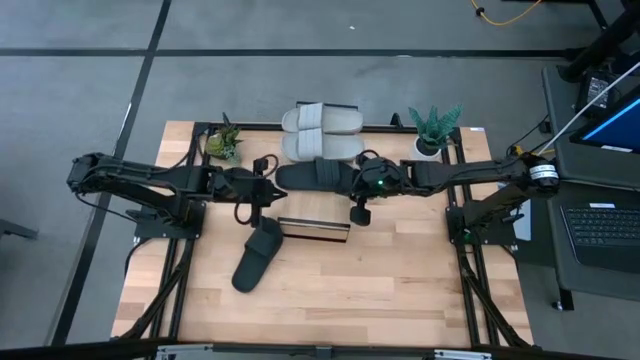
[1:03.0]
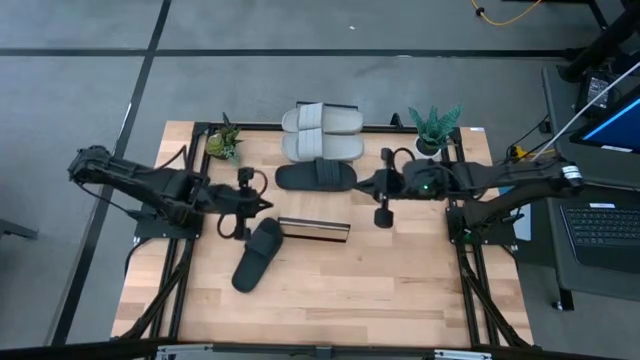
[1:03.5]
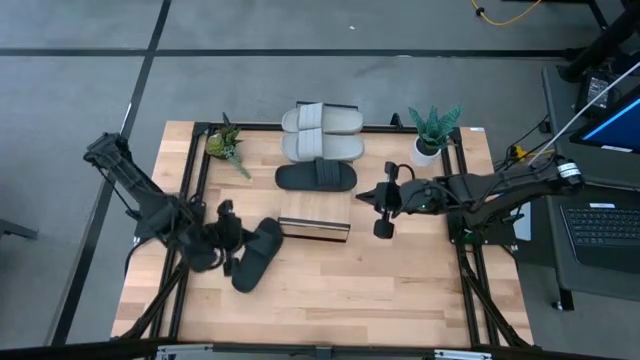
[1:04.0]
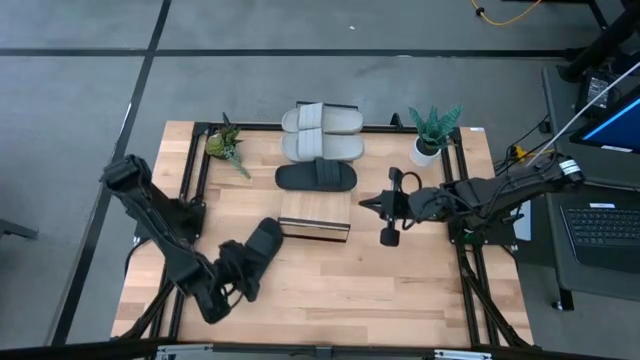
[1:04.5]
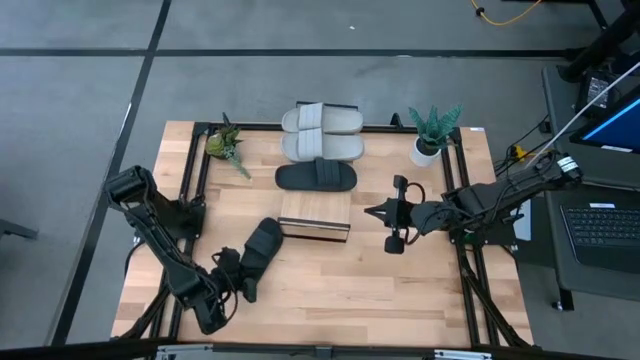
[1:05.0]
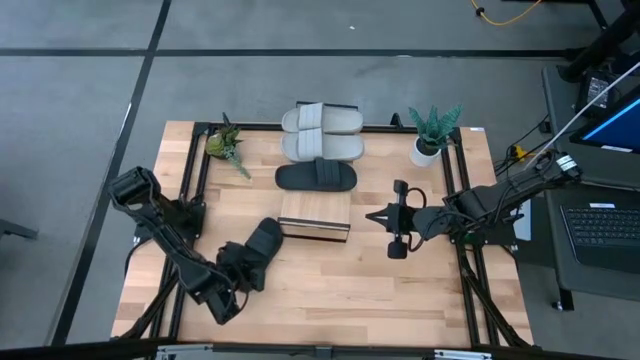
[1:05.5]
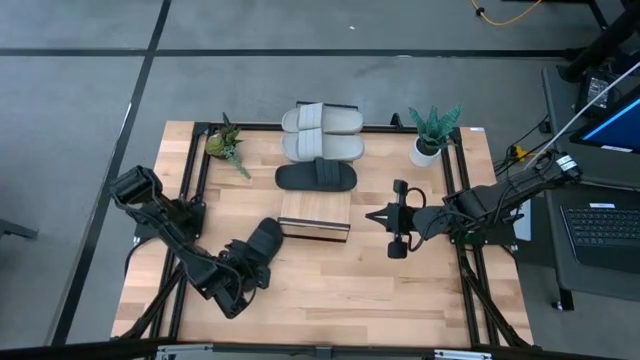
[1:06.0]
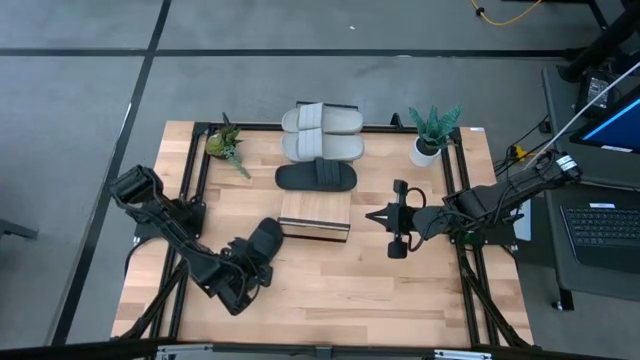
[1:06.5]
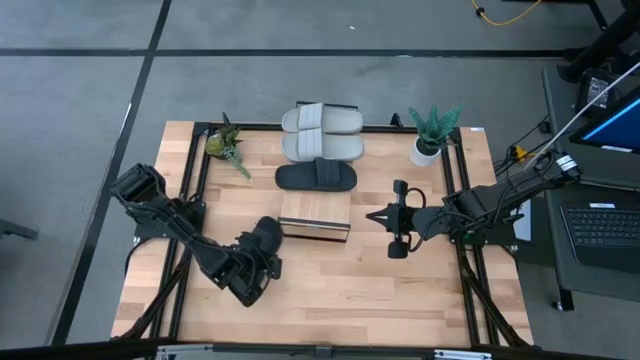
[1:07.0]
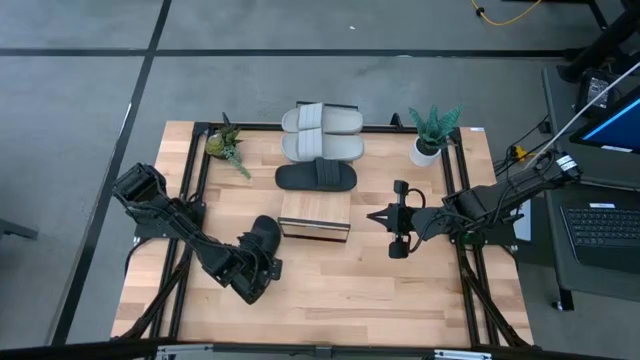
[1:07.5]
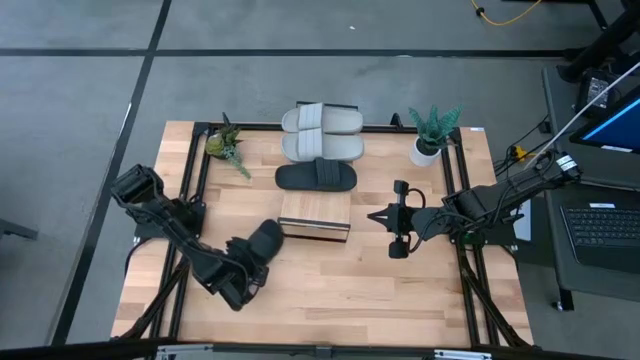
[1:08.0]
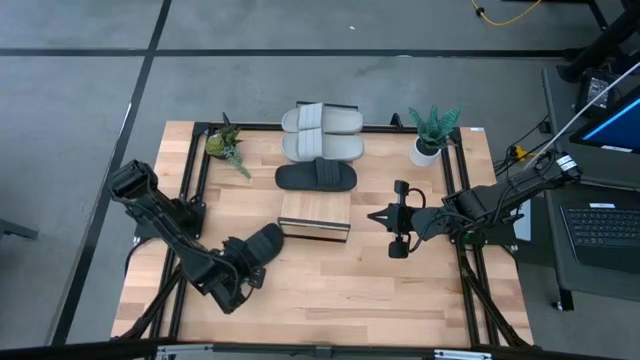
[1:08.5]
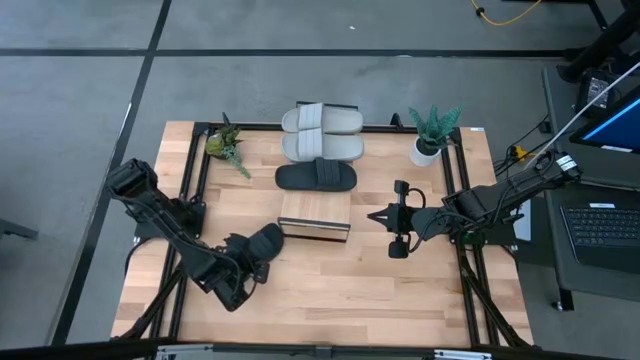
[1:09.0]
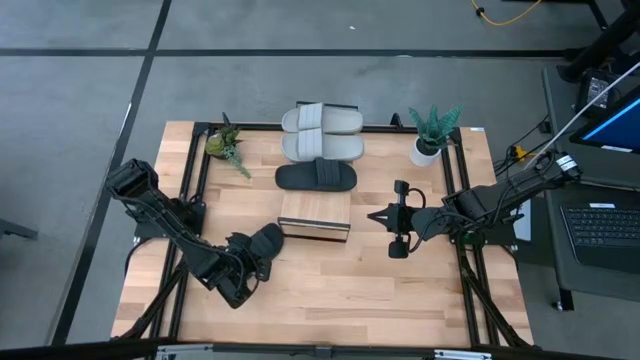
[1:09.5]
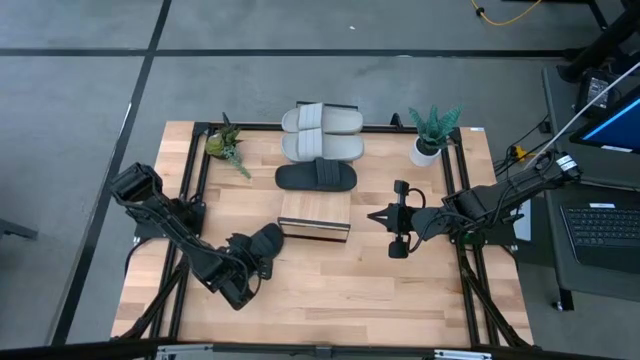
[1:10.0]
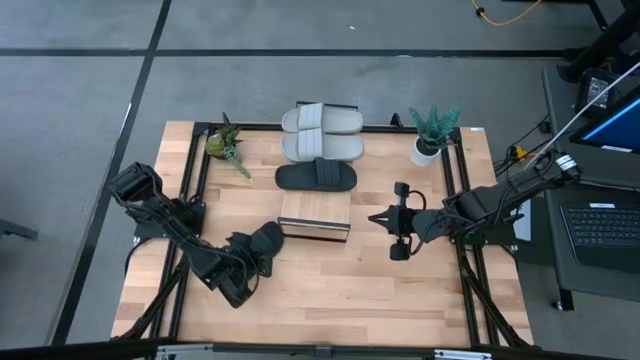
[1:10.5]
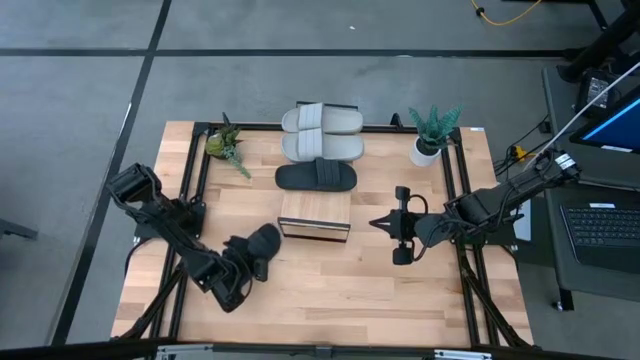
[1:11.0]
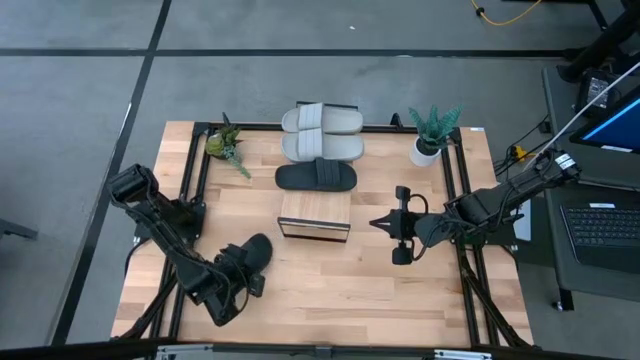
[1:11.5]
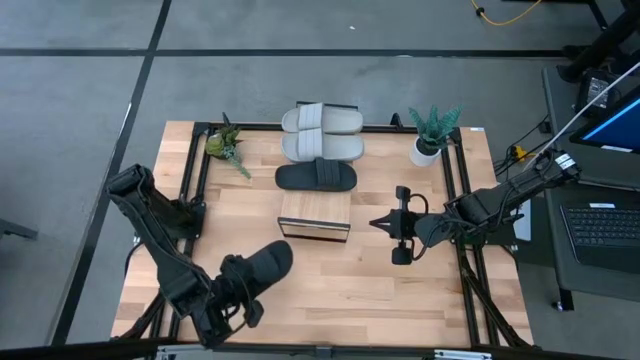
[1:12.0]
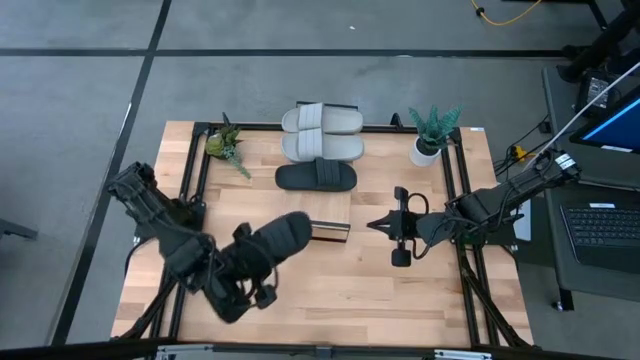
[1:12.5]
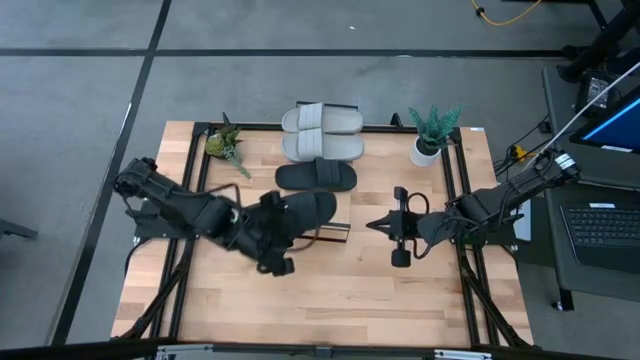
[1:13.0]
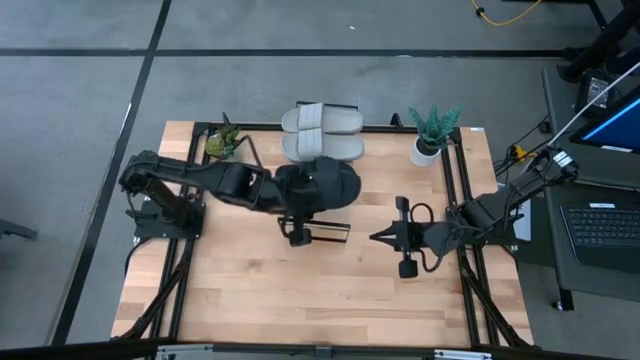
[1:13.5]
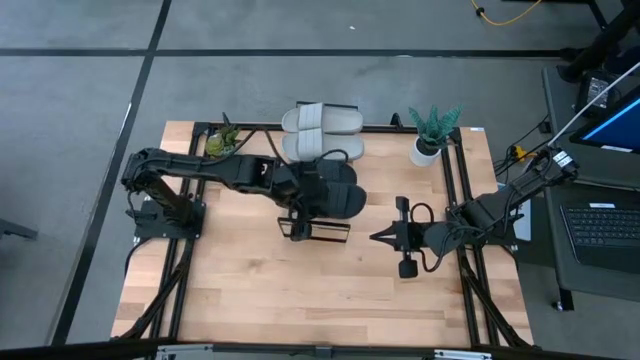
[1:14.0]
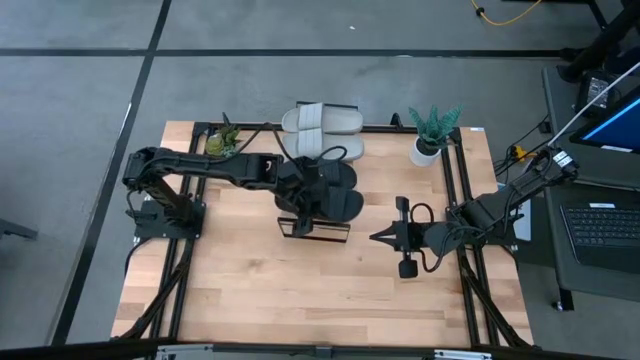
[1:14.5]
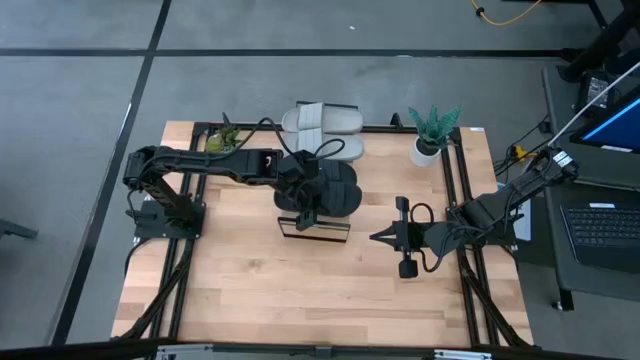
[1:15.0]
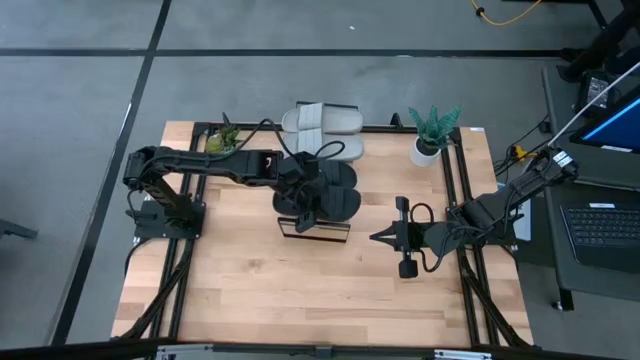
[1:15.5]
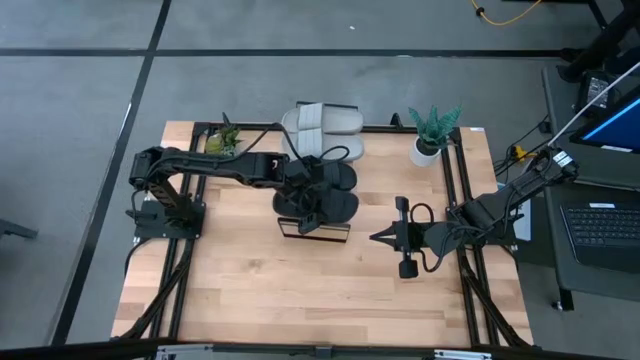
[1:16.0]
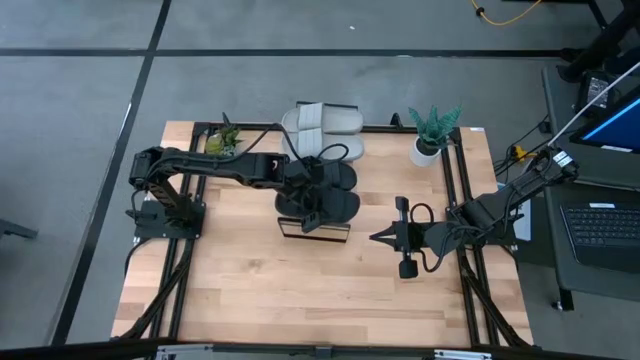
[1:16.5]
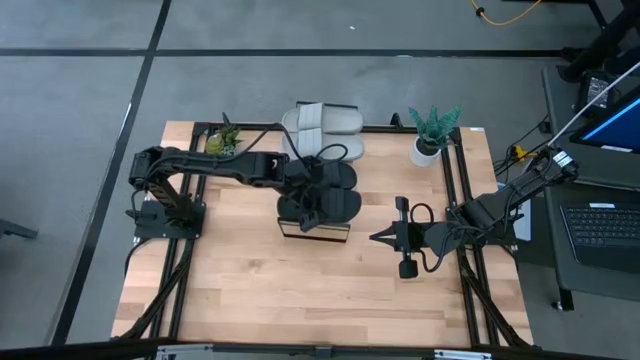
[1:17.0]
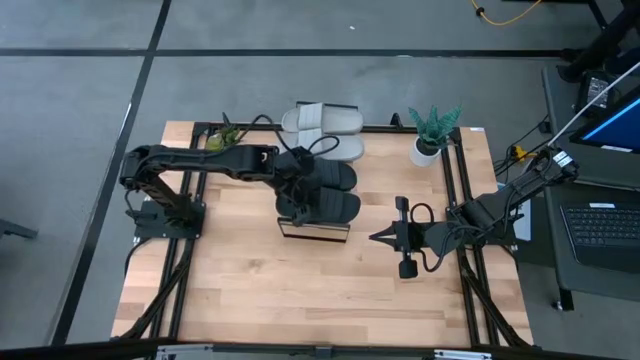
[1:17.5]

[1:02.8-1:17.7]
Task: Pick and place slides into the shelf
Put the black slide on the shelf

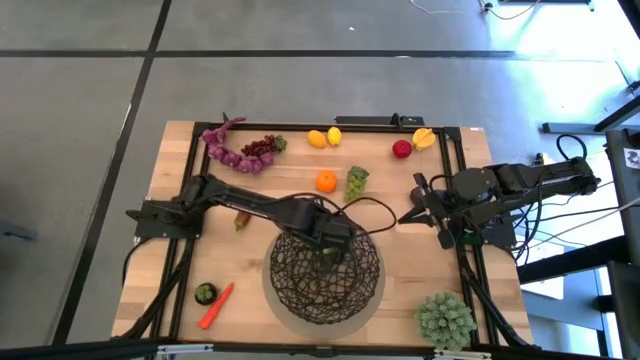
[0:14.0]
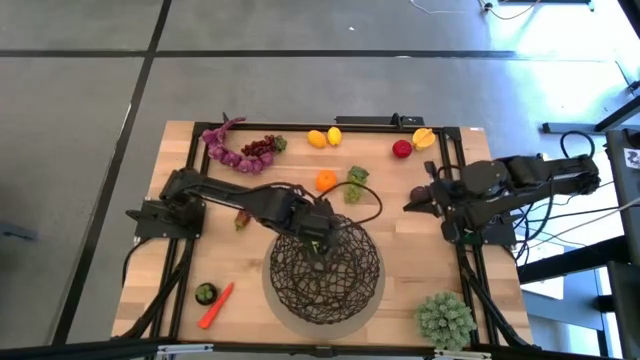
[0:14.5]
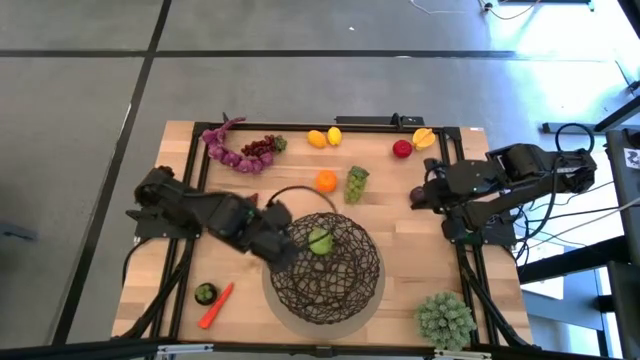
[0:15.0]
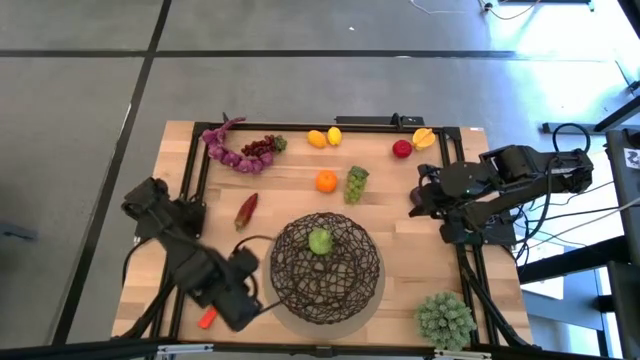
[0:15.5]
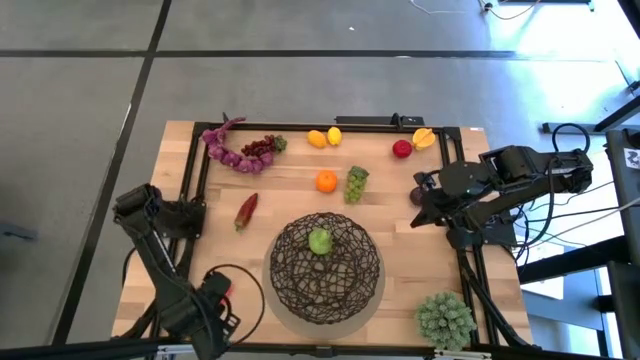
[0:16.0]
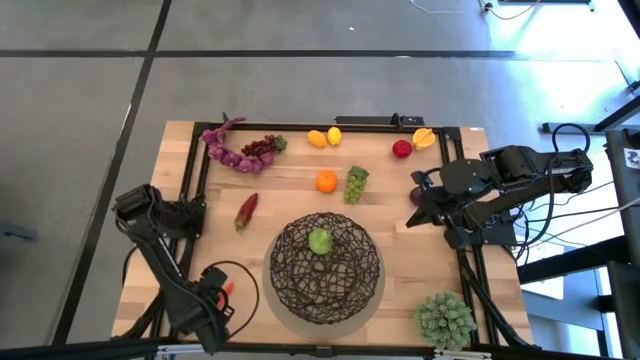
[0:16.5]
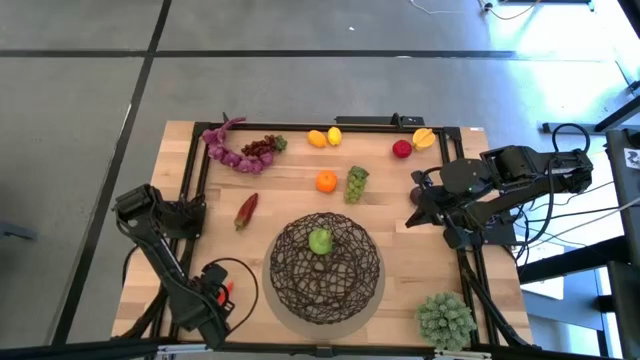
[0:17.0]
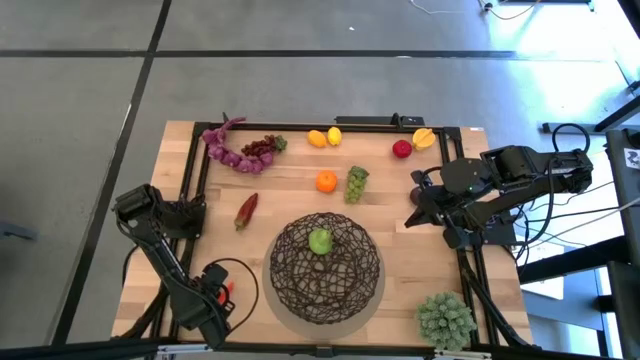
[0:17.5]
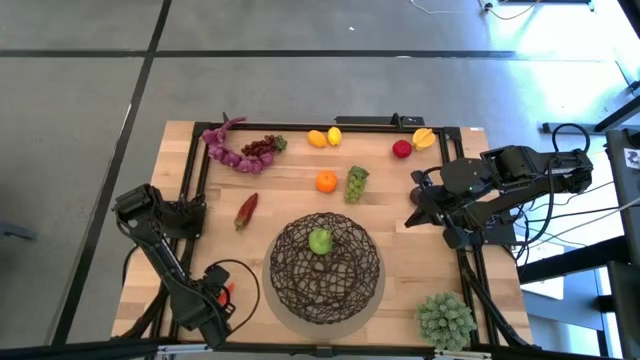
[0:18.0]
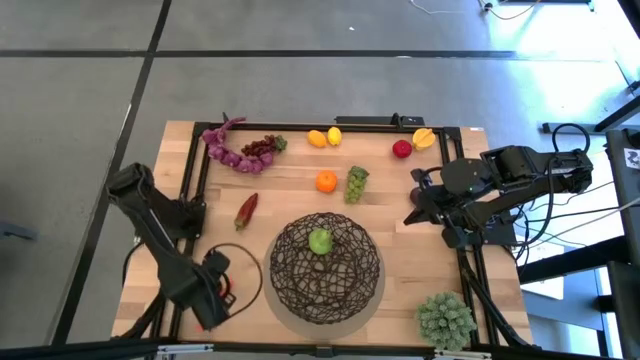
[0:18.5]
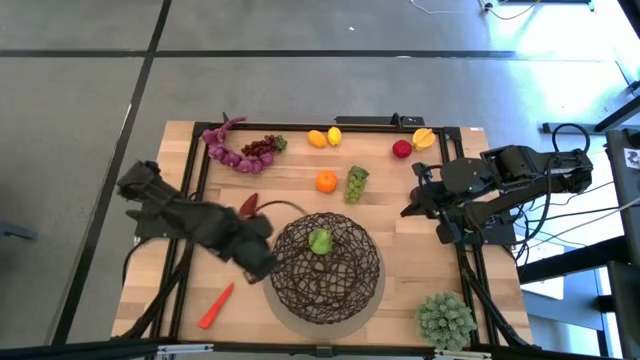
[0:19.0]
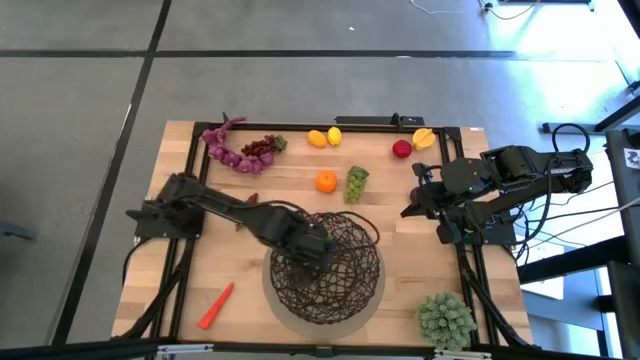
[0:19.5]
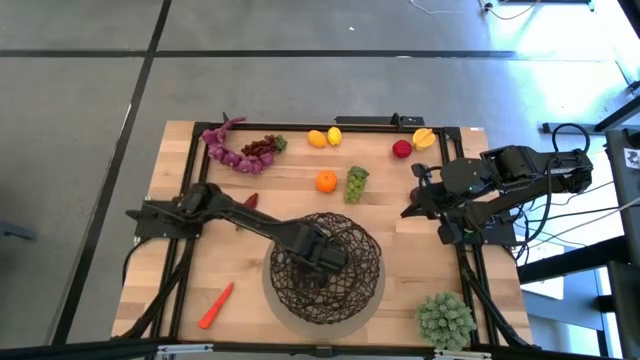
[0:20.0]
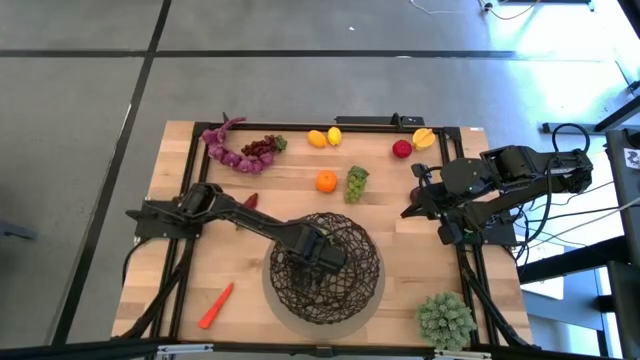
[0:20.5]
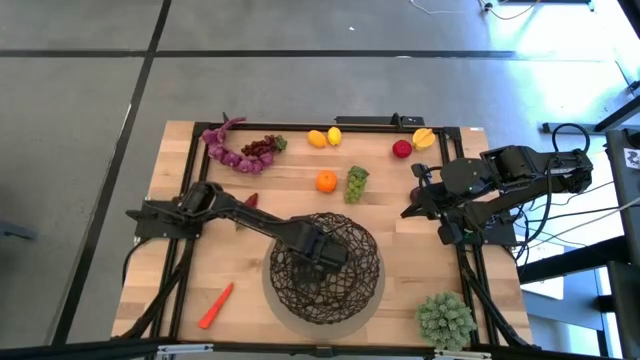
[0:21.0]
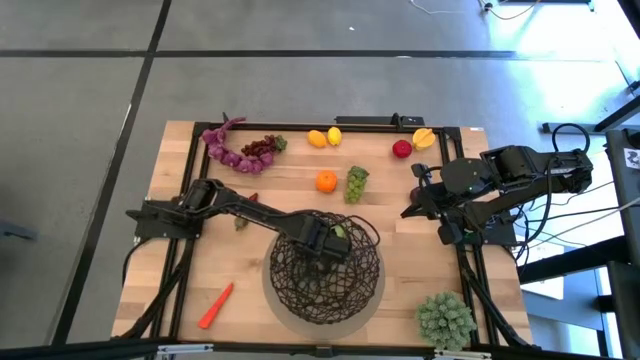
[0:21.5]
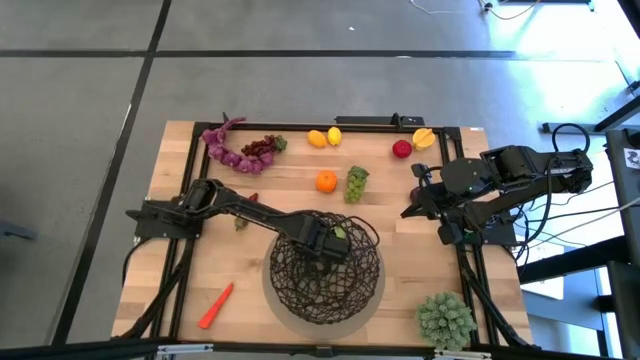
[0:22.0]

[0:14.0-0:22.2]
Task: Build produce basket
Put the mangosteen into the mesh basket
